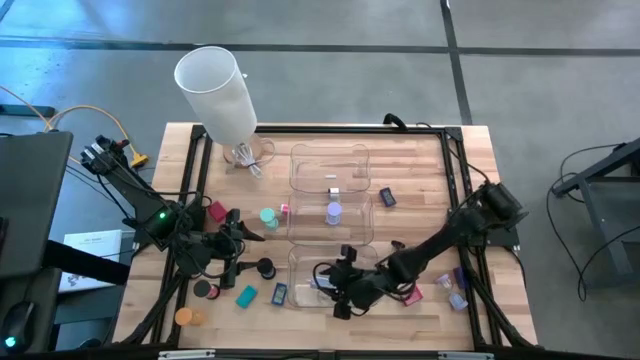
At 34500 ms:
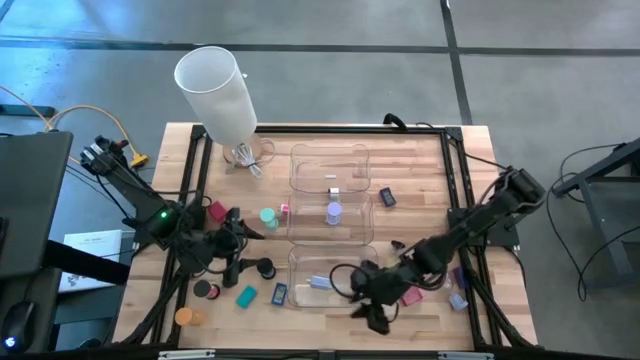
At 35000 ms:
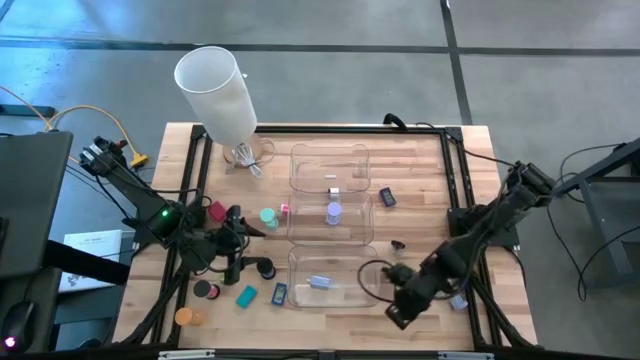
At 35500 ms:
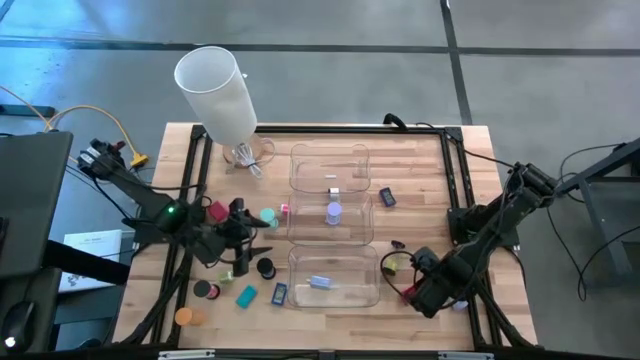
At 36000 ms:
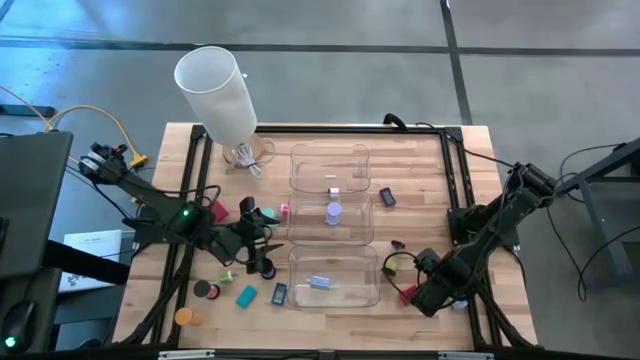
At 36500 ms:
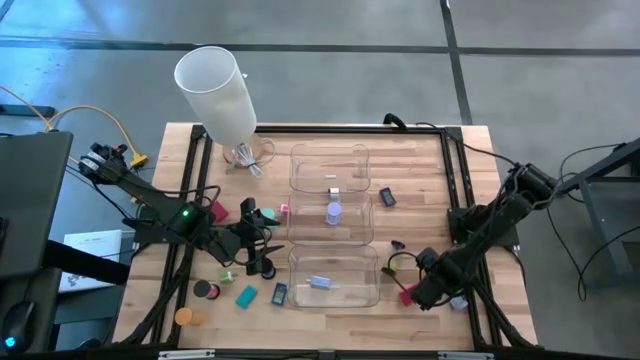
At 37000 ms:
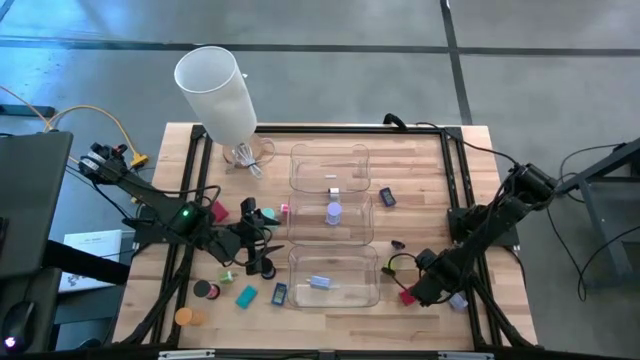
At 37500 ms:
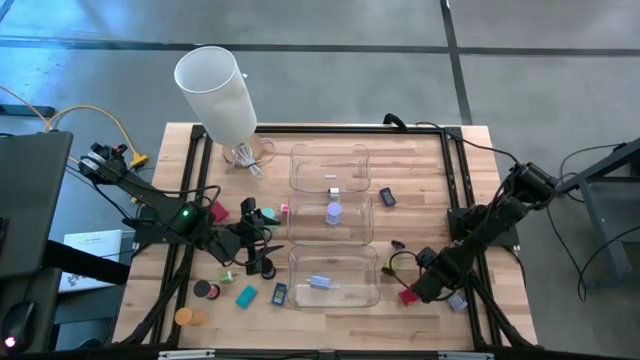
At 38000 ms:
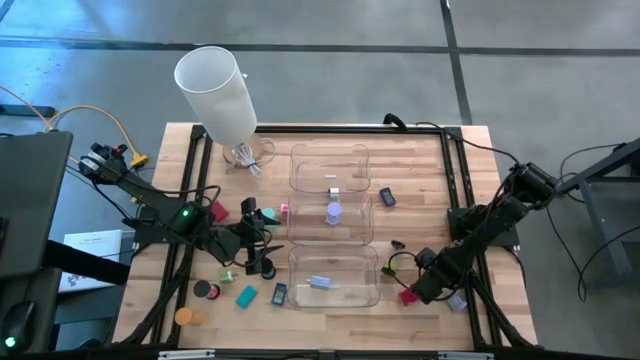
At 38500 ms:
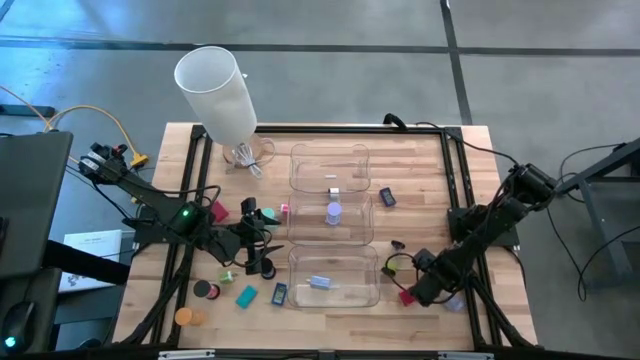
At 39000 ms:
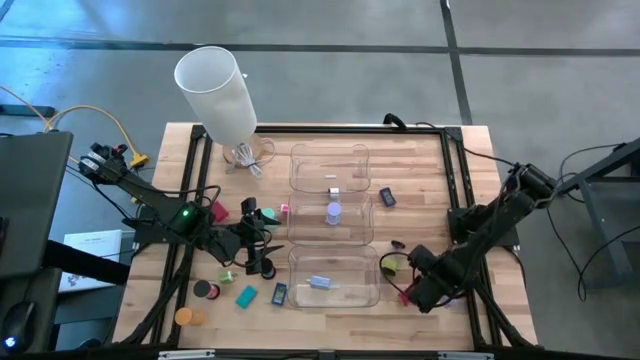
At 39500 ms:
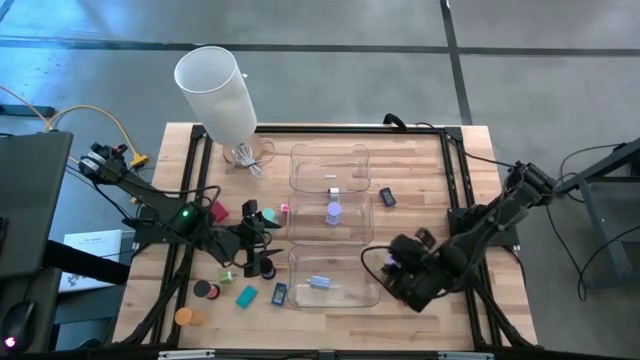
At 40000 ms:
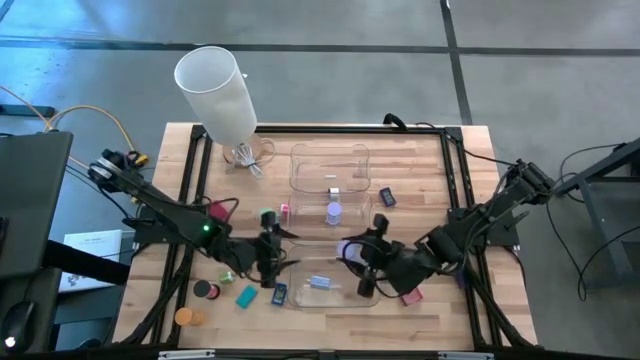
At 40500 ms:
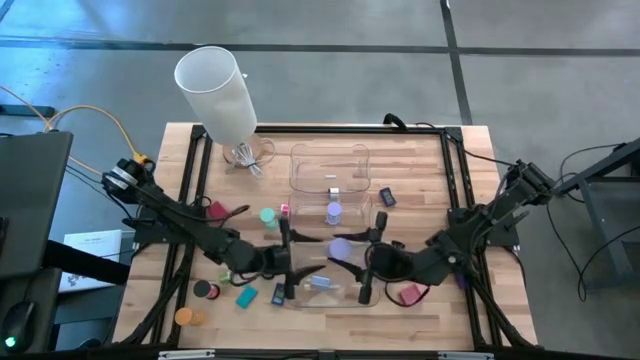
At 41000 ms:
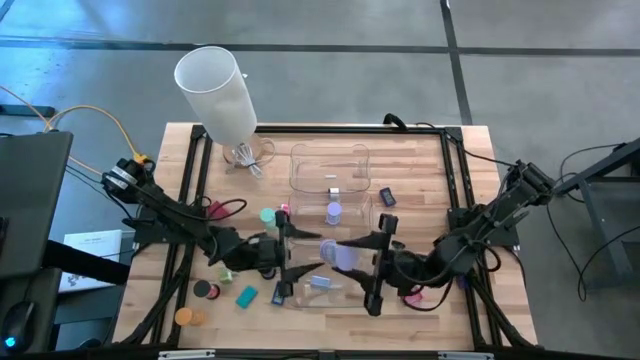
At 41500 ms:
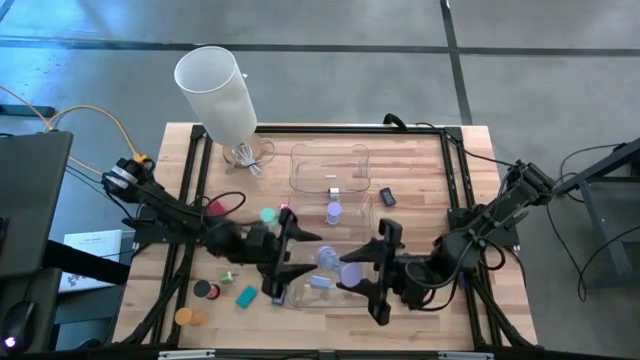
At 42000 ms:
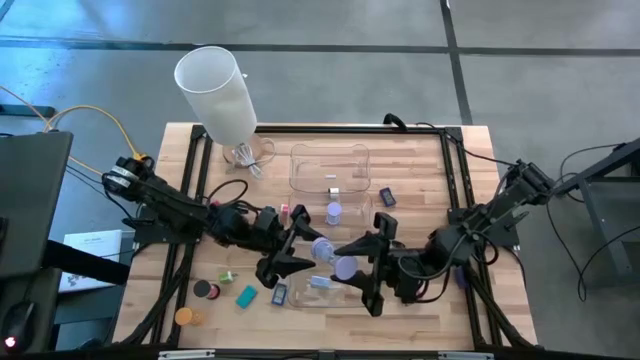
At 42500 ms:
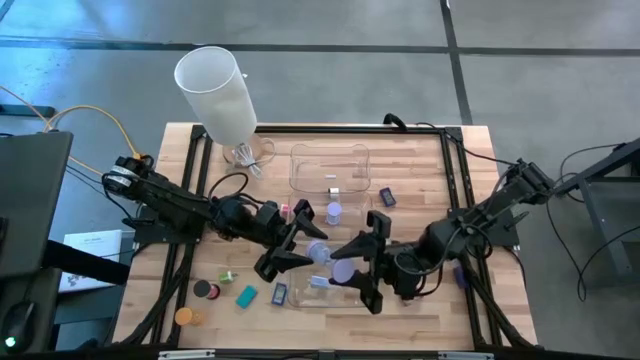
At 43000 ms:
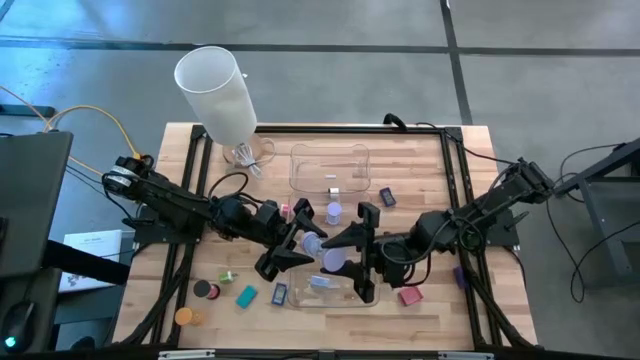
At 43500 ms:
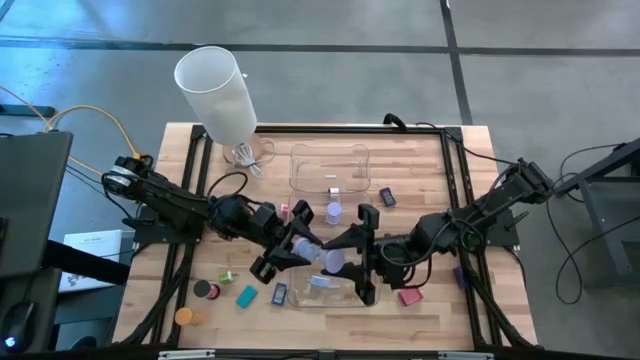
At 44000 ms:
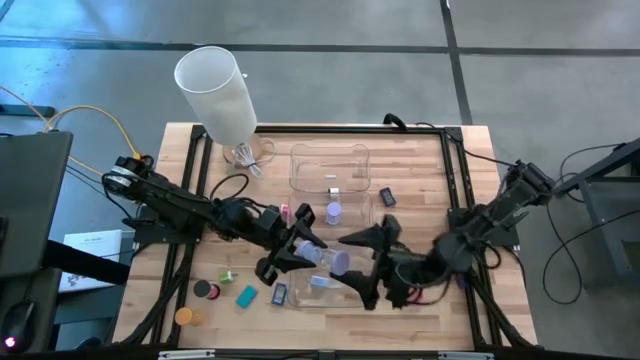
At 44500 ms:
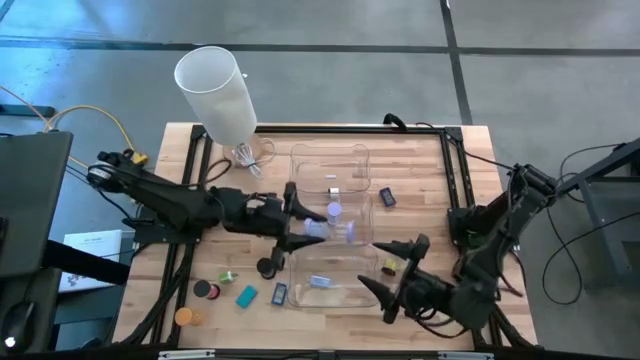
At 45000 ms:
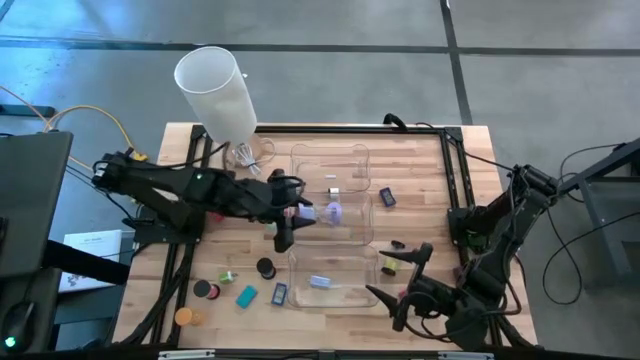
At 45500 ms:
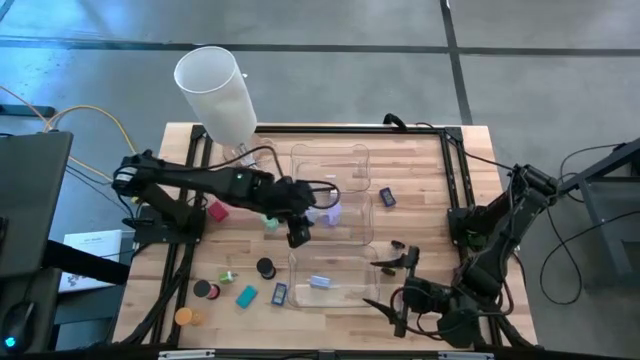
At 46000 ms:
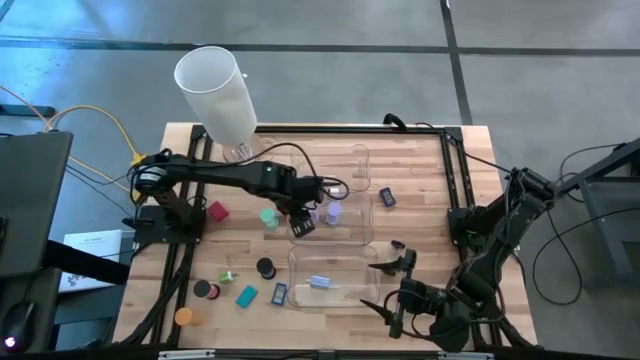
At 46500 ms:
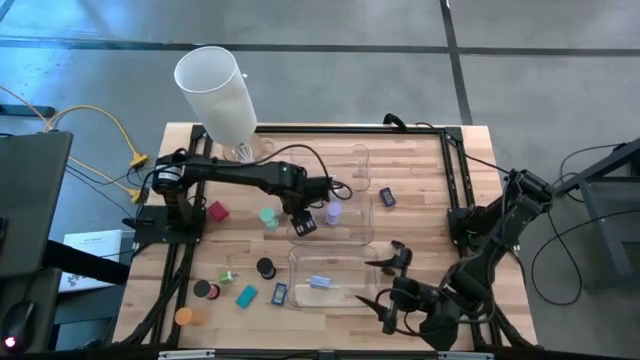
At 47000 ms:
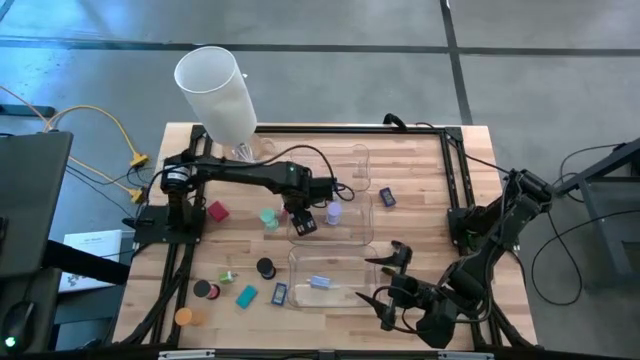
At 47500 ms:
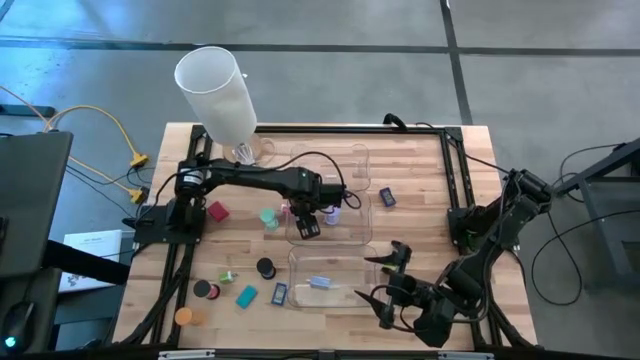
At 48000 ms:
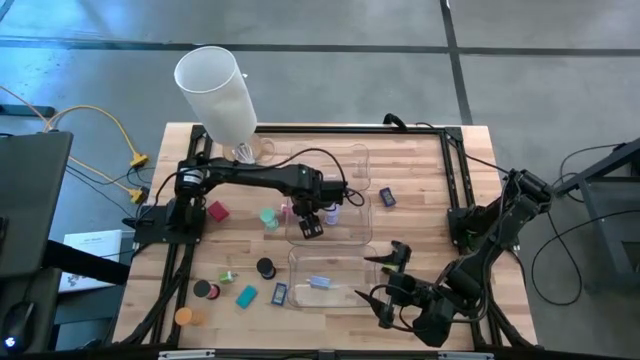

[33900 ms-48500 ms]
Task: Pick & Place Office items
Put the purple hourglass into the middle transparent bin

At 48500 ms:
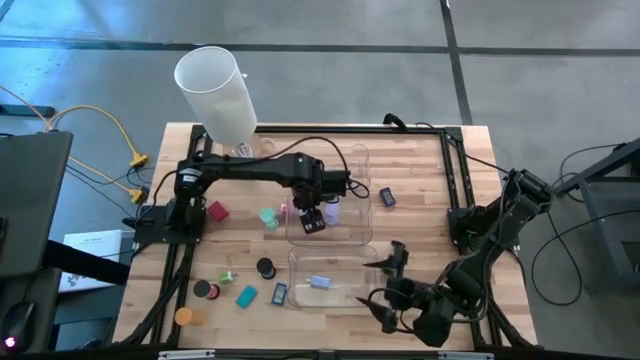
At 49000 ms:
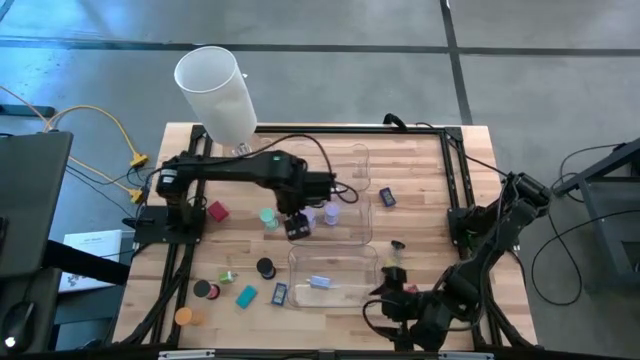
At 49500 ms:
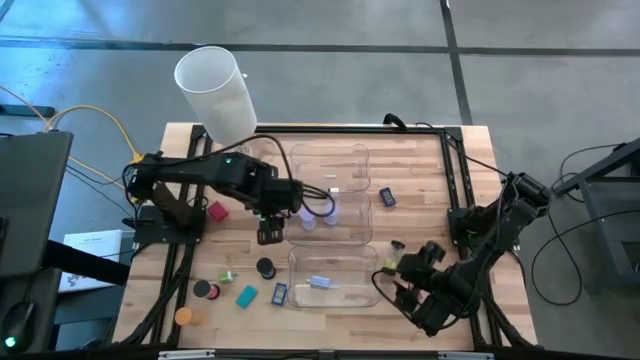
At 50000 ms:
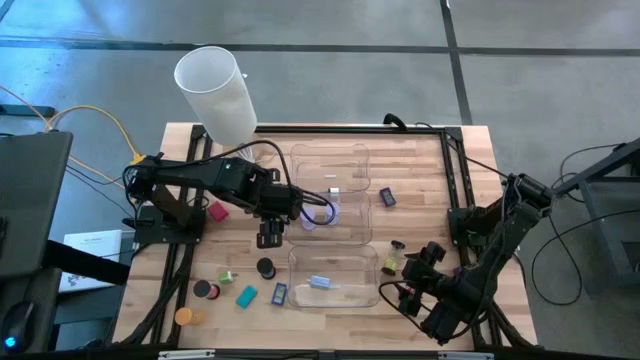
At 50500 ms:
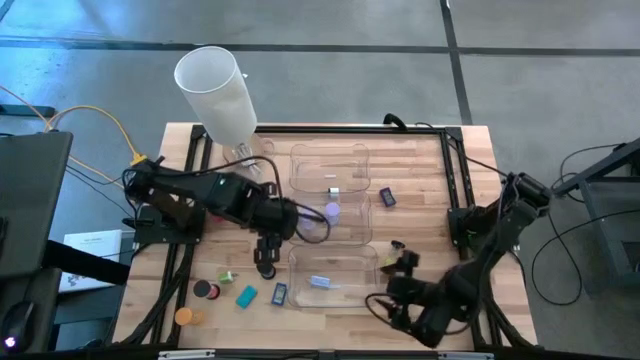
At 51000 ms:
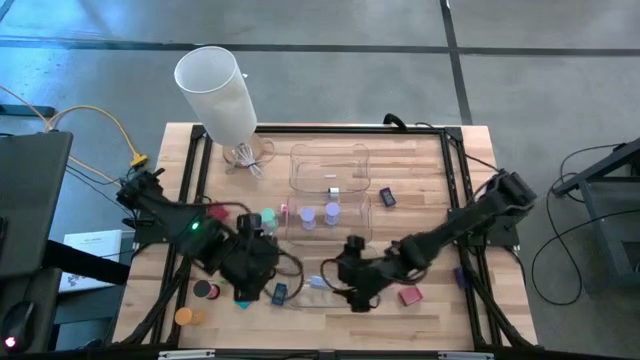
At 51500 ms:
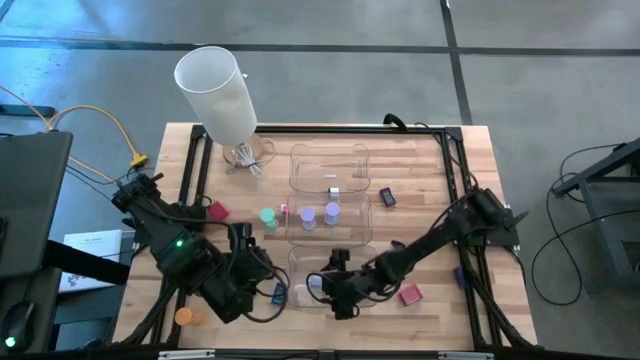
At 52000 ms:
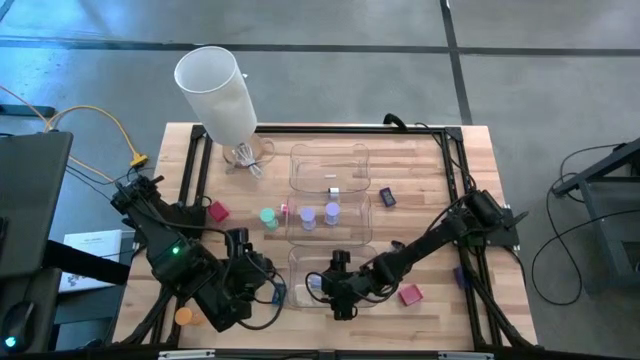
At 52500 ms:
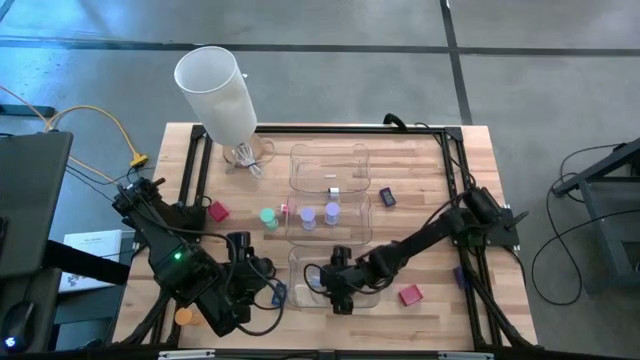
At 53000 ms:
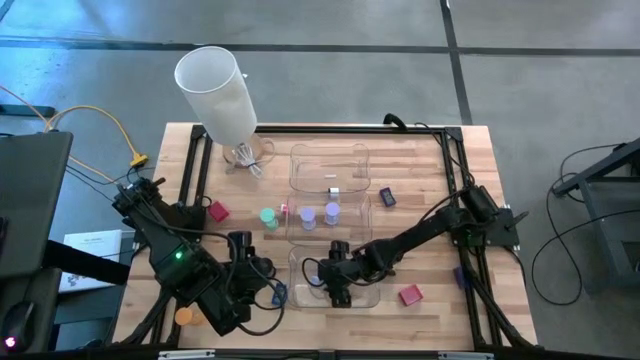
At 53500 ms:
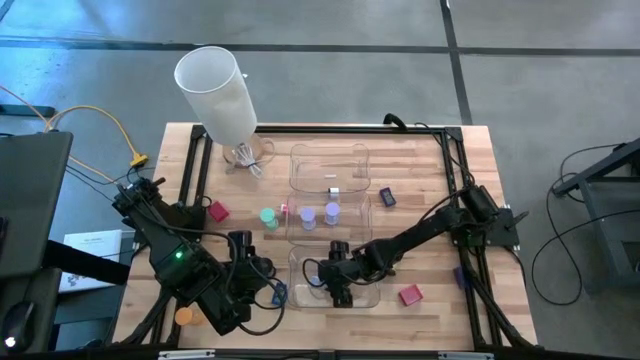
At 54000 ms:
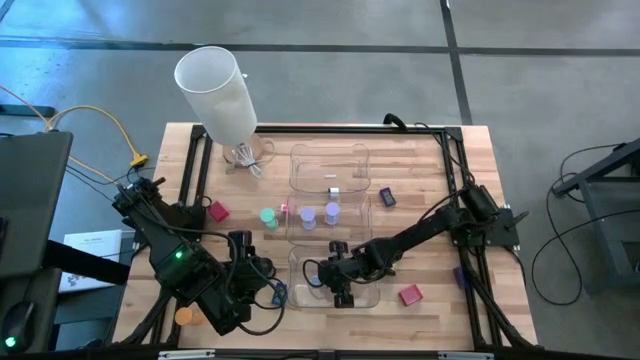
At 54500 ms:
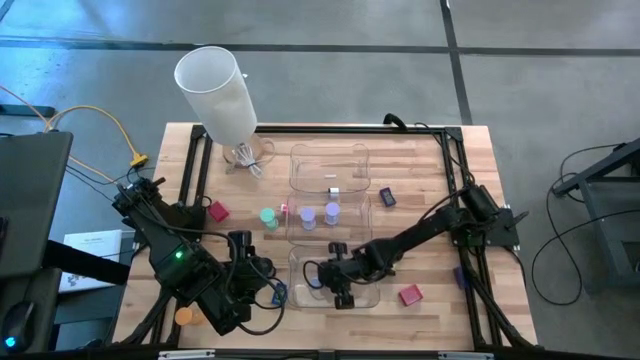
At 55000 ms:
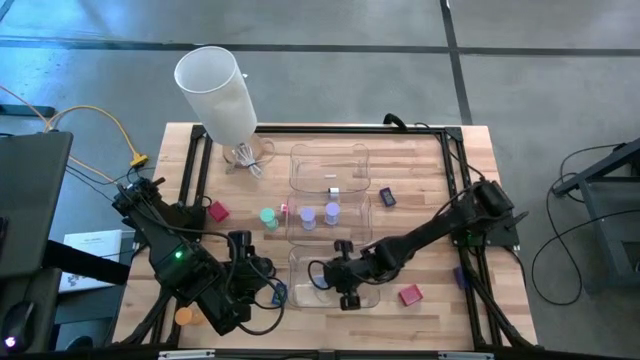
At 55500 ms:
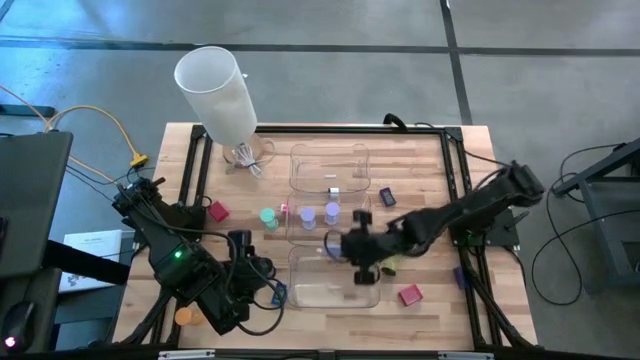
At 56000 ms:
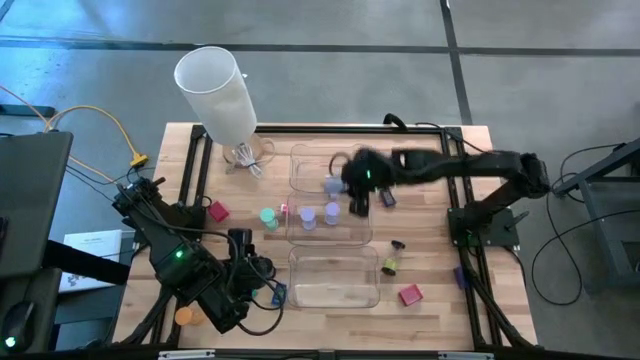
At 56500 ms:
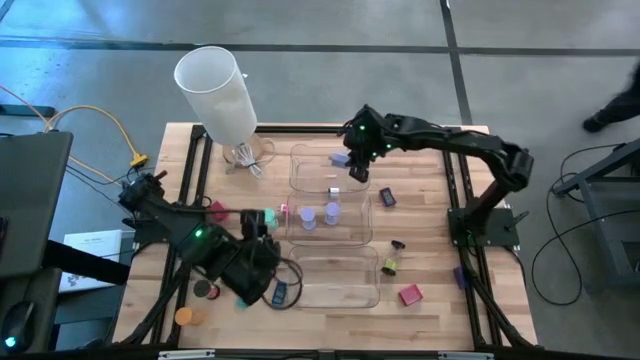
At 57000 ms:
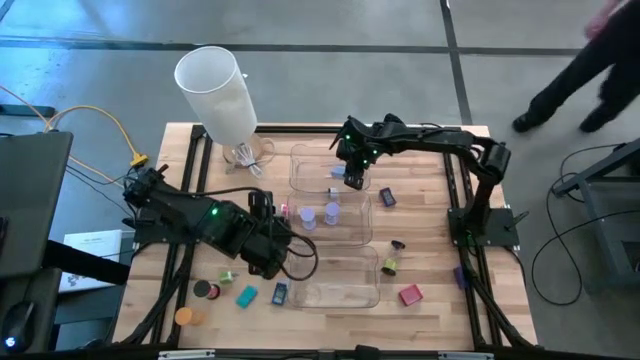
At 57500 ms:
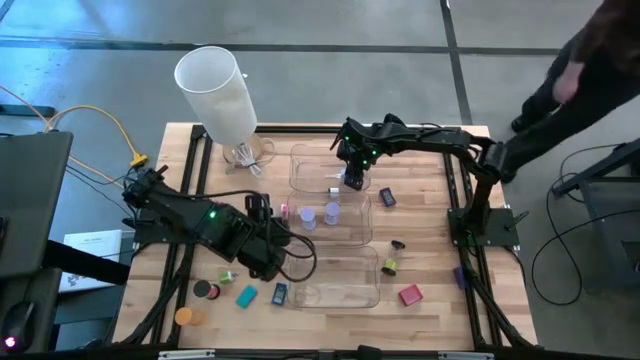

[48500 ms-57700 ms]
Put the purple charger adapter into the top transparent bin
